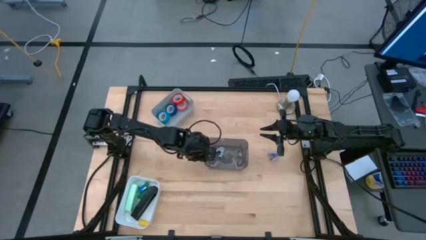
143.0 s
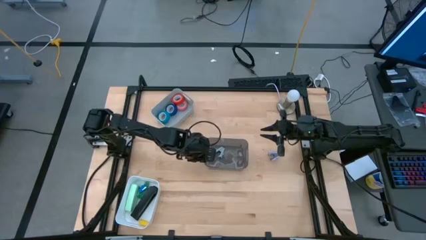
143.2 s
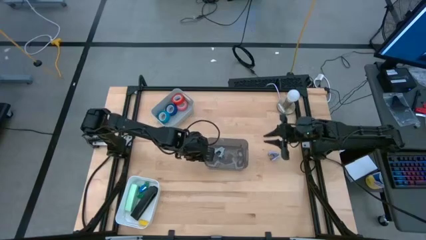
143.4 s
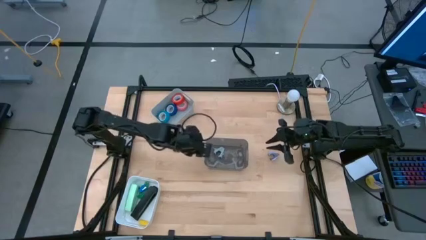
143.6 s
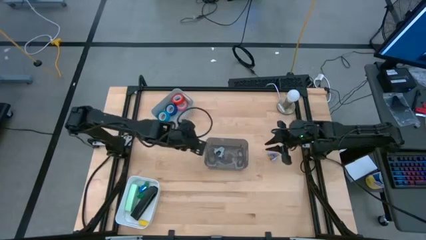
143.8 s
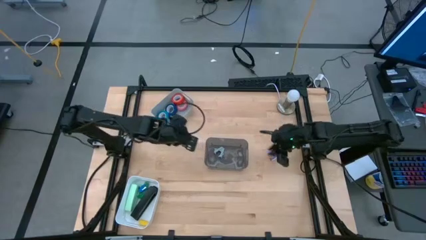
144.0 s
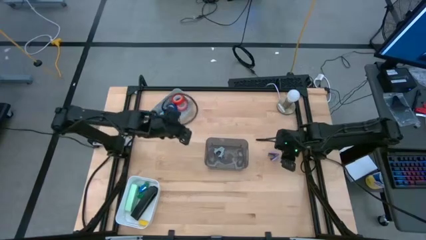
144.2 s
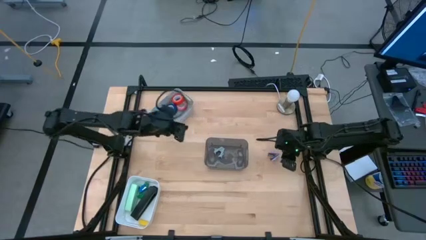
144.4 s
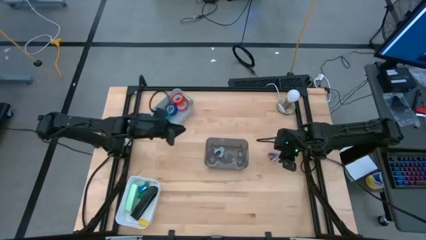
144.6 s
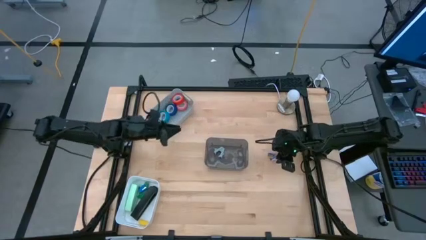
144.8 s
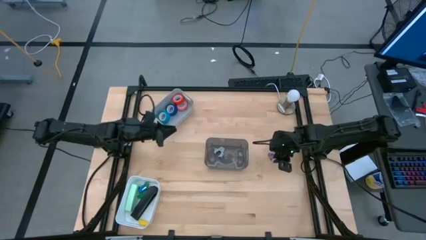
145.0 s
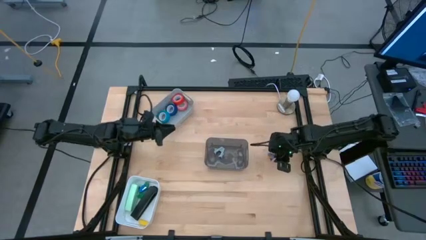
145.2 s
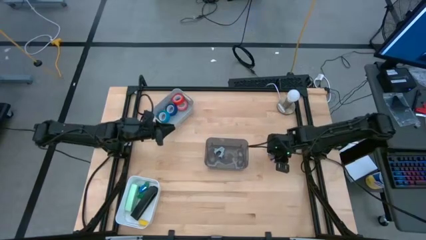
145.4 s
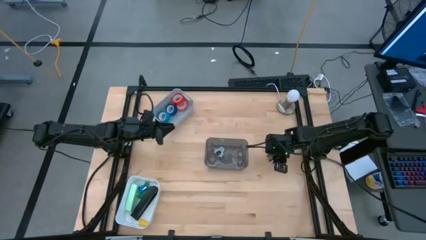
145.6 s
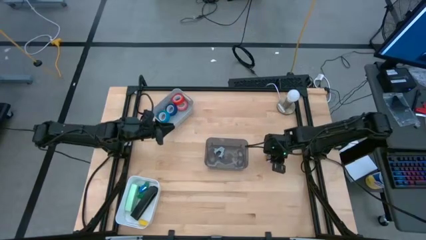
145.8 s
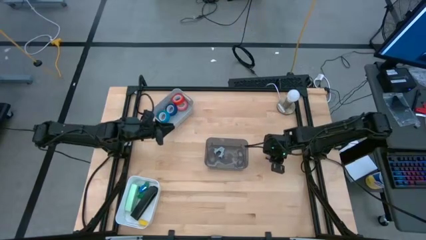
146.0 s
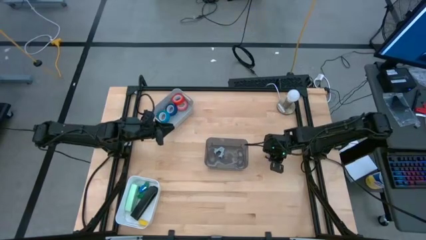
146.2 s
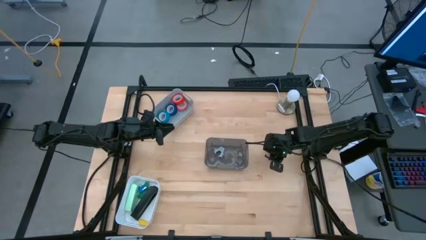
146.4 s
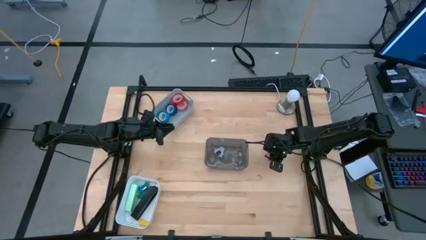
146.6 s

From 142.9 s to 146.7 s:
Task: Pick and place Stapler, Stapler remover, tape
Put the purple staple remover into the black bin

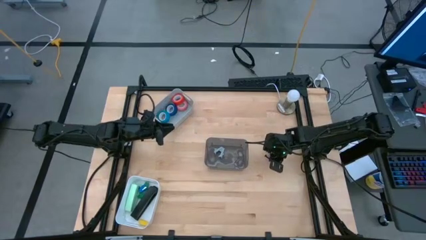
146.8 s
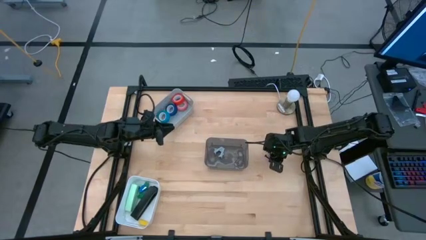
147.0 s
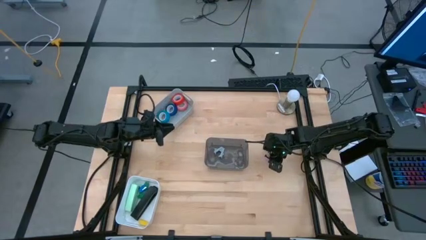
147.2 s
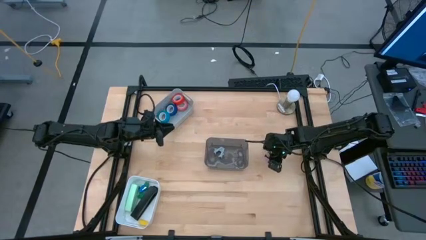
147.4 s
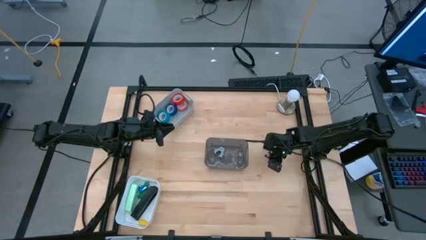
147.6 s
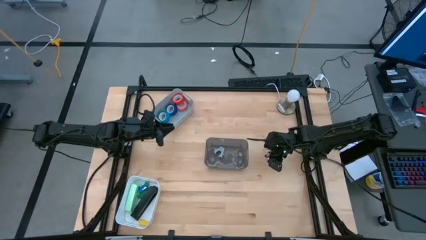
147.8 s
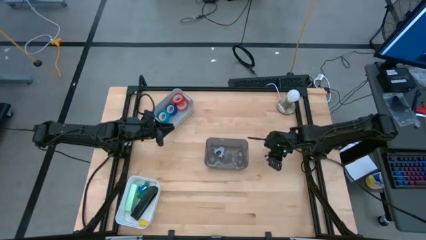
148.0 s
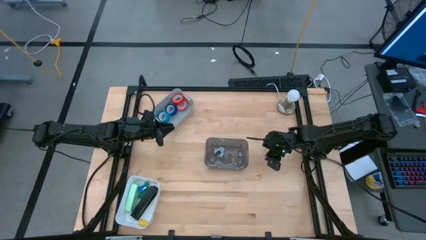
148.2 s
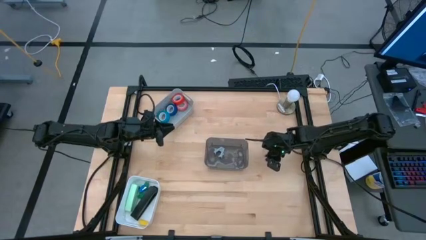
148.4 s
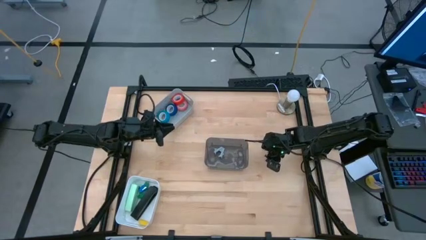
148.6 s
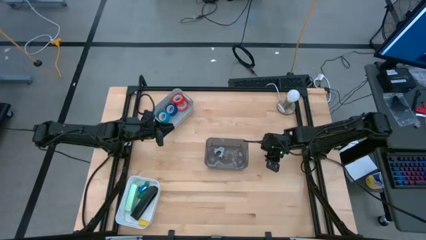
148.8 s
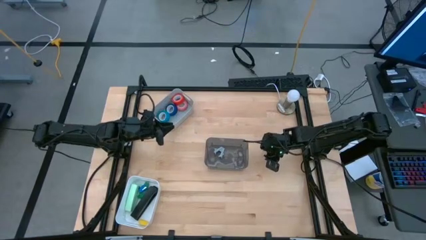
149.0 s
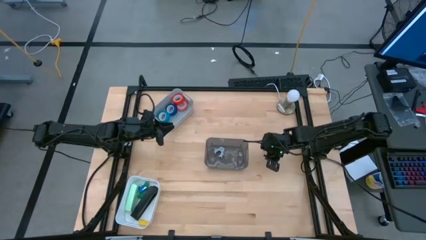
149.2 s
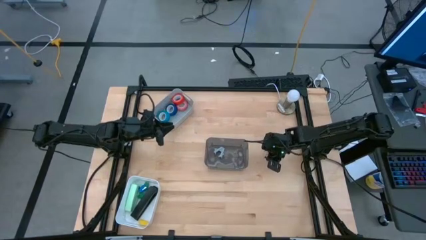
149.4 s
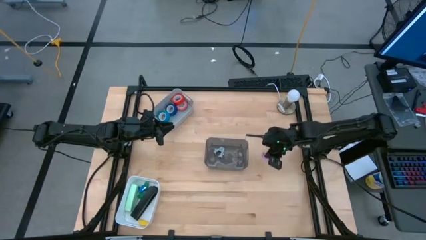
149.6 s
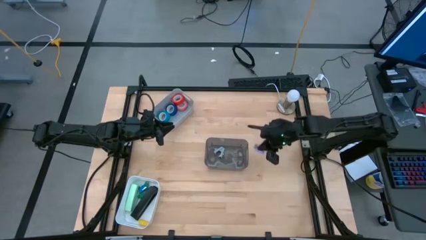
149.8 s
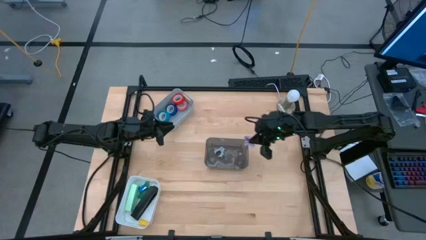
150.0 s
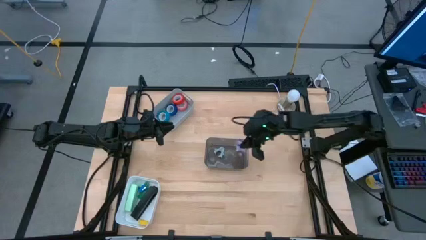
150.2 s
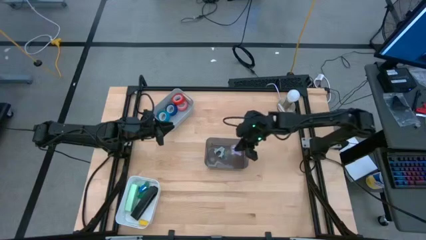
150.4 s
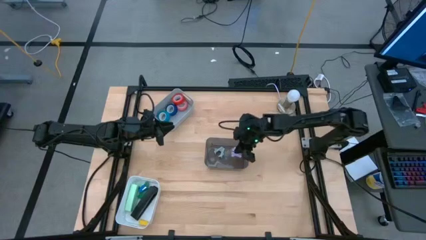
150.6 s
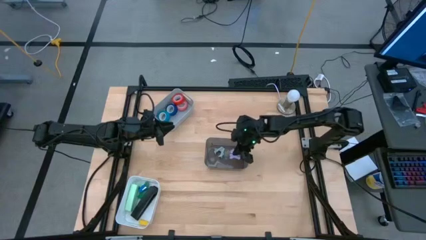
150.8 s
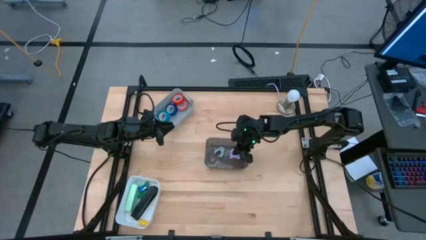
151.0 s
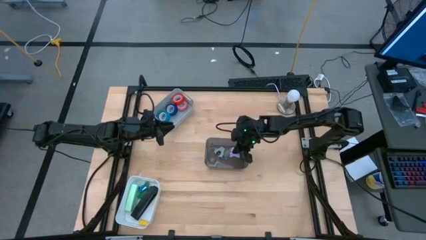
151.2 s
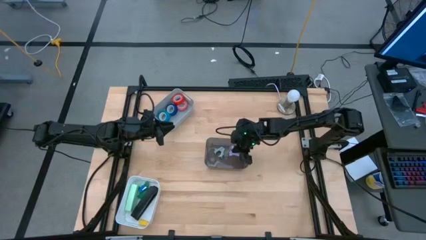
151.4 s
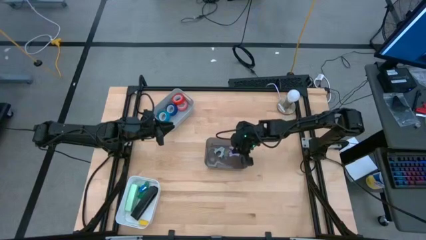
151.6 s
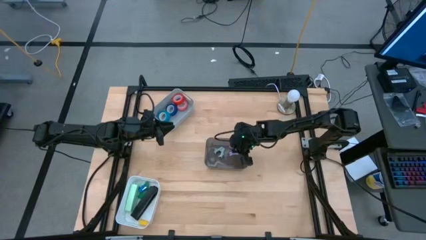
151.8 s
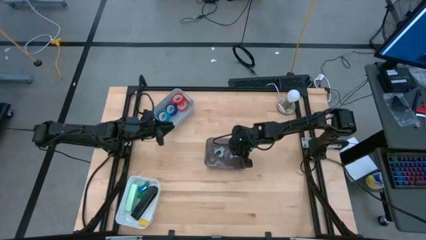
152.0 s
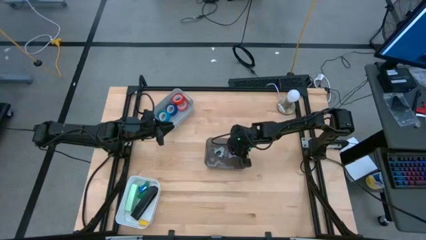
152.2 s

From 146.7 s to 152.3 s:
Put the purple staple remover into the black bin

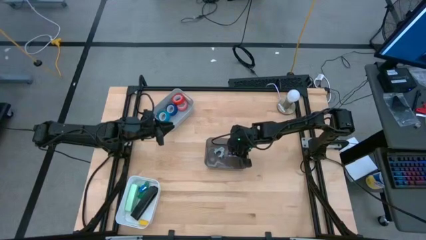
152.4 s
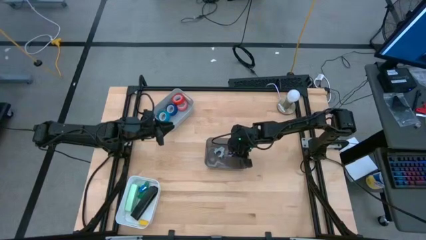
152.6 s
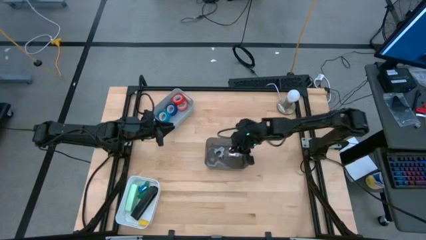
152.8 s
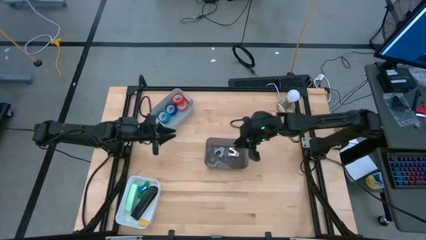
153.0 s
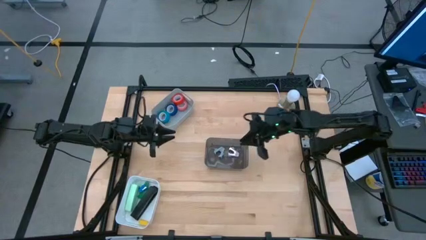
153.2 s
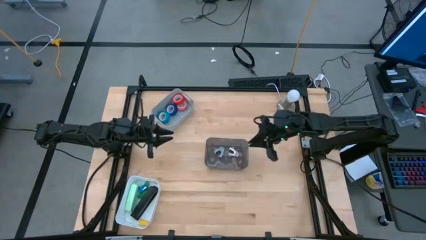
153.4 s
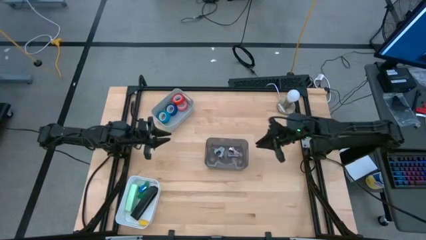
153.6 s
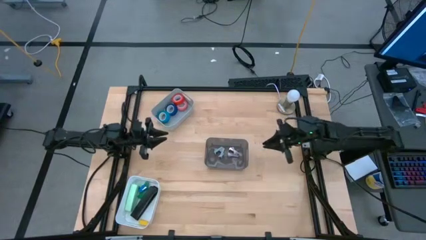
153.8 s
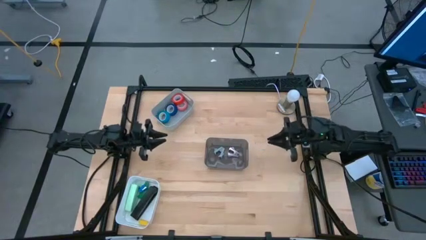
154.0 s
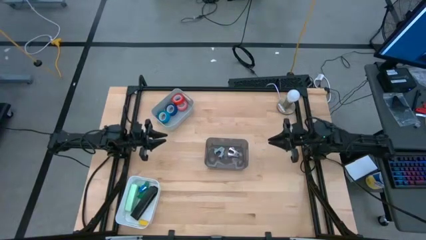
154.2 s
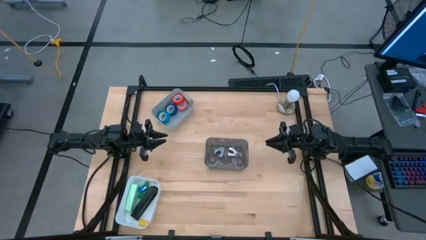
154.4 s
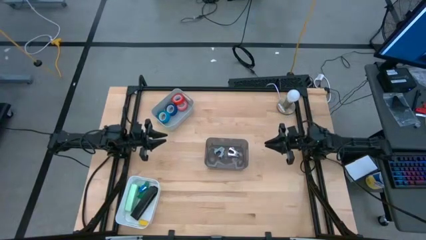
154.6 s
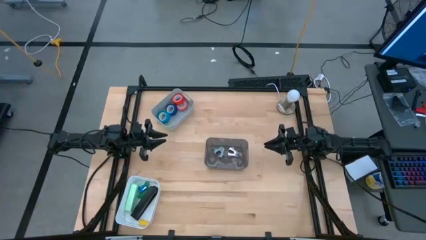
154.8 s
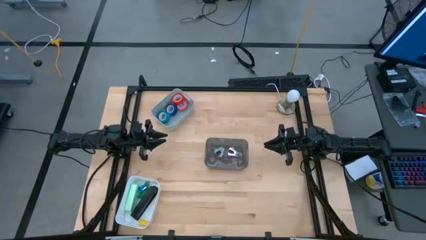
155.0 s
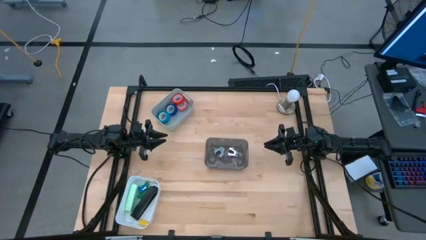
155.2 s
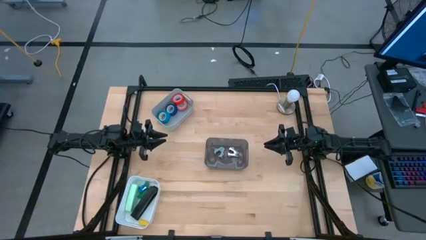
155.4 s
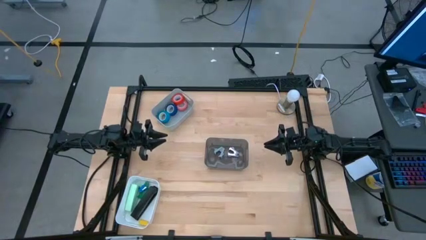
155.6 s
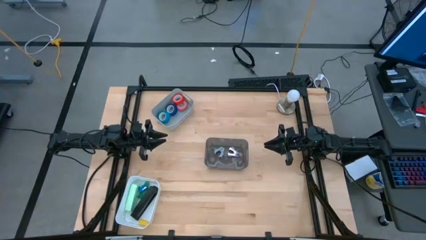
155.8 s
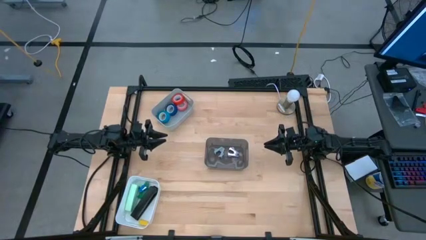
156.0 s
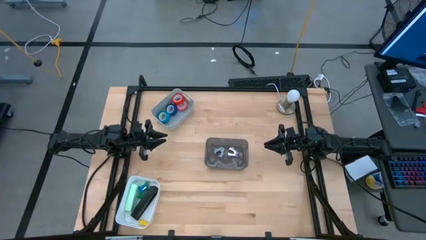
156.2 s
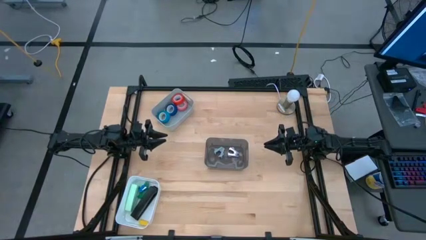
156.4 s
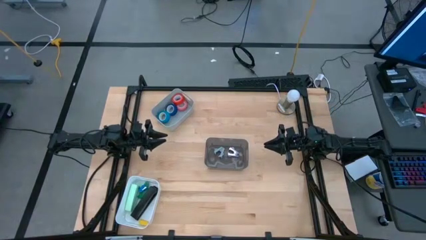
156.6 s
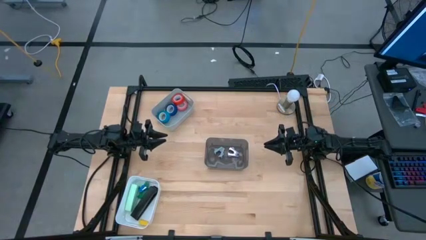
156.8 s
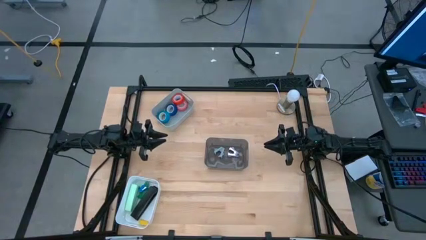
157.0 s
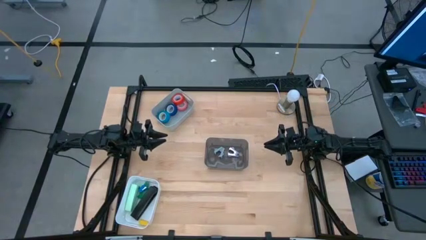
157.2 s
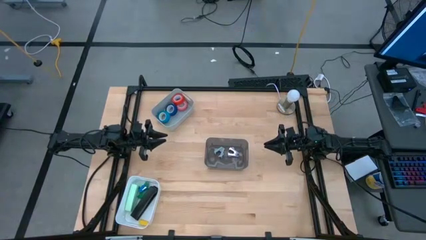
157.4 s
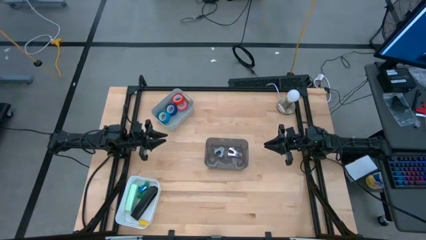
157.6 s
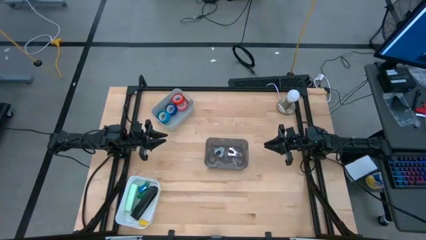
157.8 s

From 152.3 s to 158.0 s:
Return to Home Position

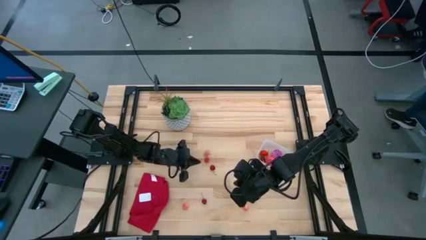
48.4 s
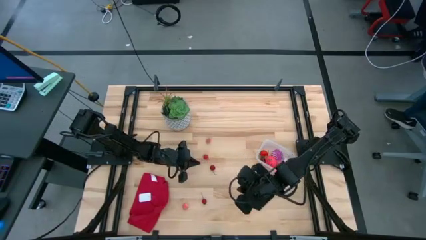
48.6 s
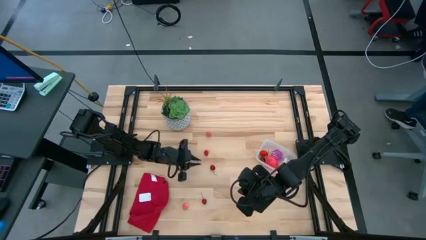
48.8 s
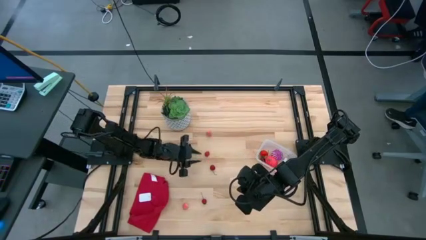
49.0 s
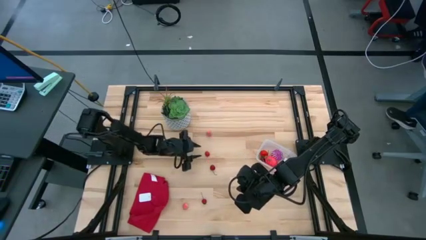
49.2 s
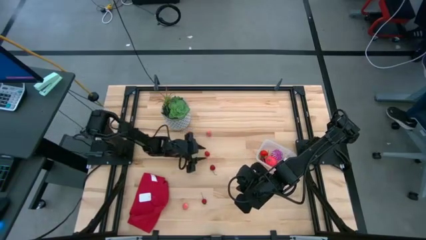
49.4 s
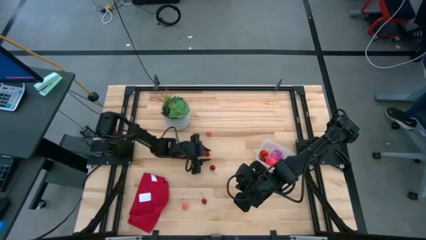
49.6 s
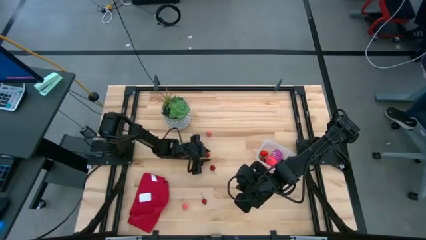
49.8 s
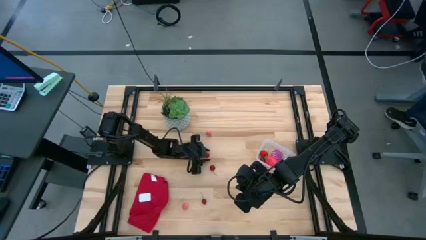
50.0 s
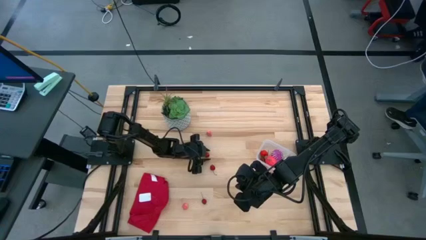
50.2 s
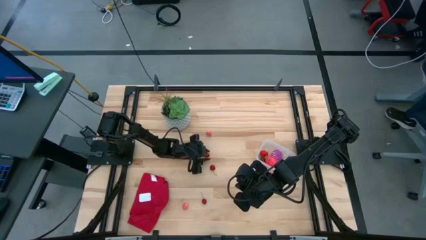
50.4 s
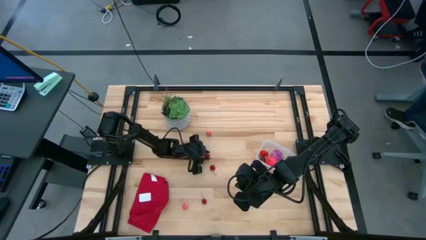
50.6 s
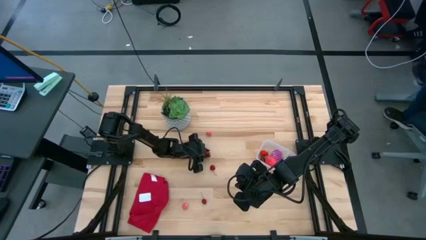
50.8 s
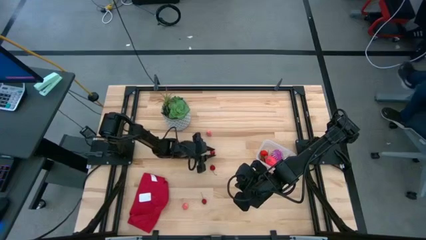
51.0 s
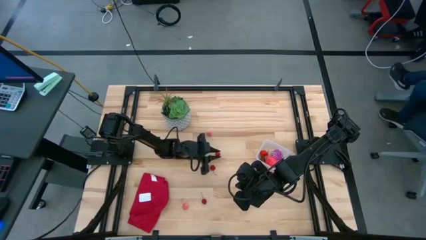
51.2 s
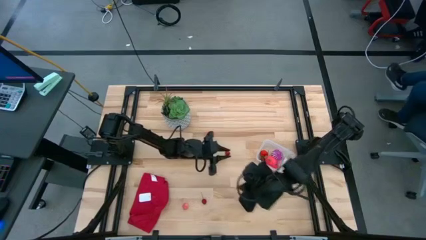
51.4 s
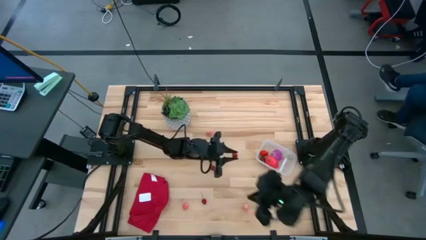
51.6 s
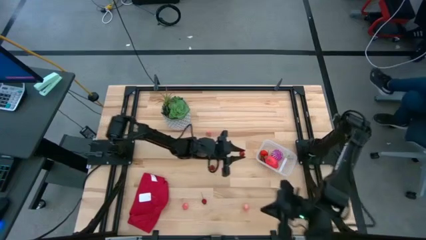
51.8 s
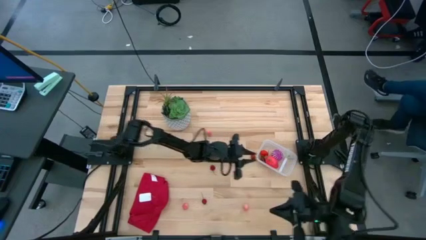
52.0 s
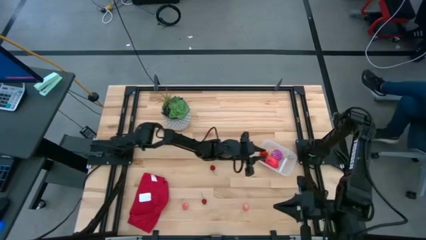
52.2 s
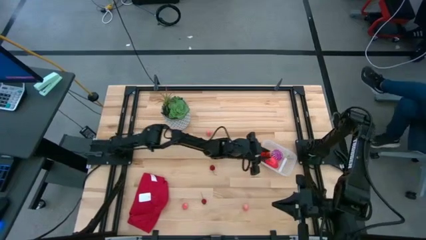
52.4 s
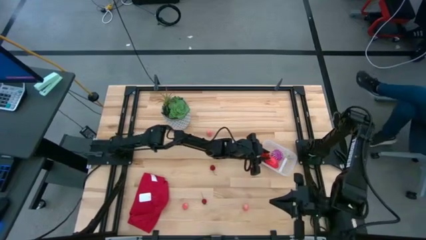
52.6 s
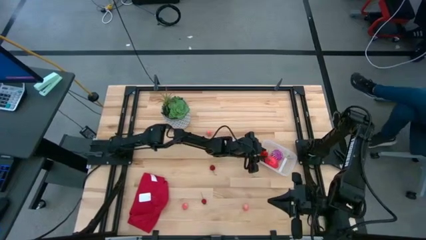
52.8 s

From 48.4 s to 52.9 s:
Task: Pick and placing Produce into tupperware
Put the raspberry into the transparent bin
